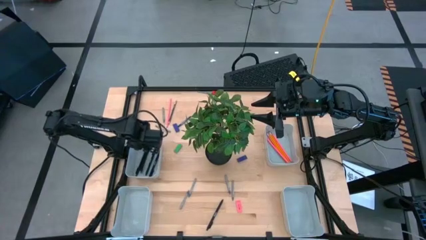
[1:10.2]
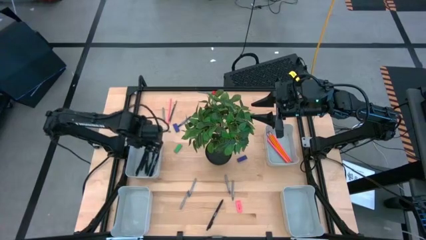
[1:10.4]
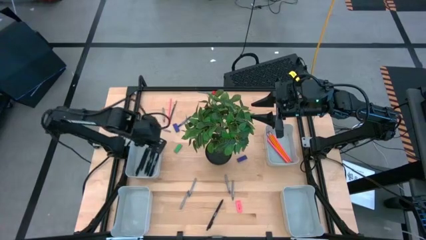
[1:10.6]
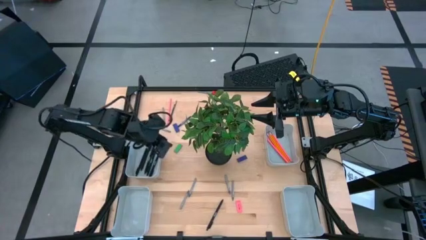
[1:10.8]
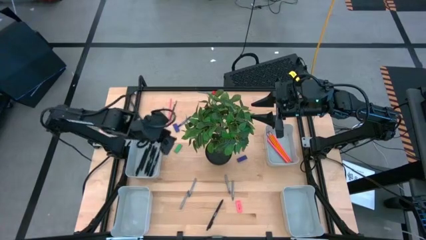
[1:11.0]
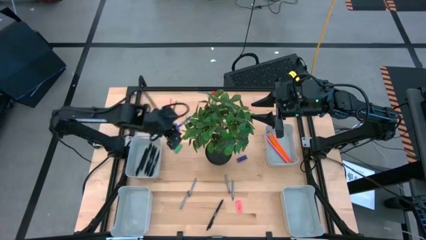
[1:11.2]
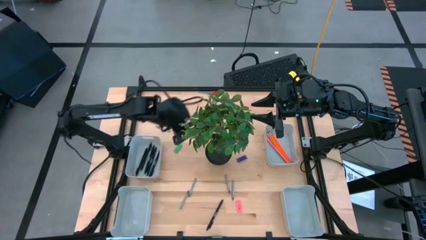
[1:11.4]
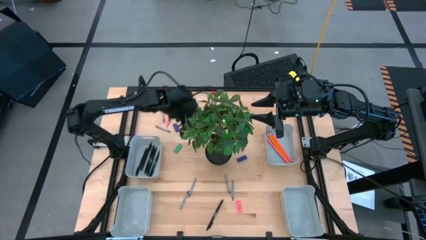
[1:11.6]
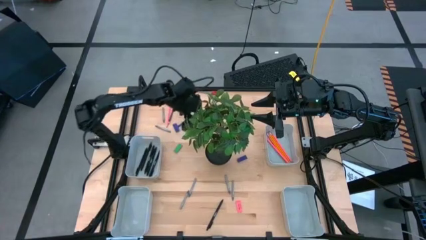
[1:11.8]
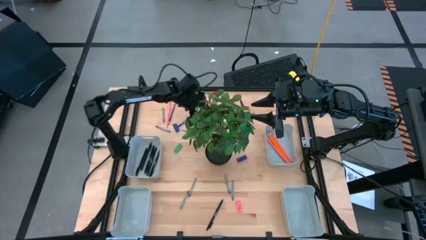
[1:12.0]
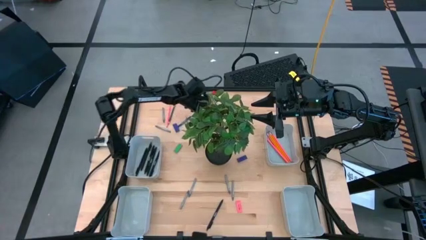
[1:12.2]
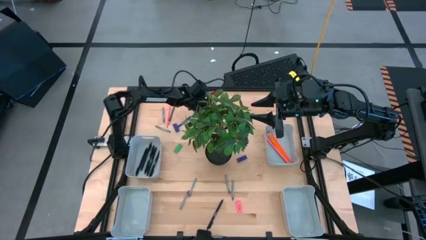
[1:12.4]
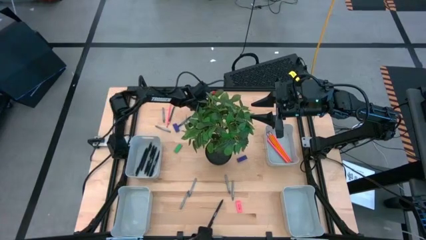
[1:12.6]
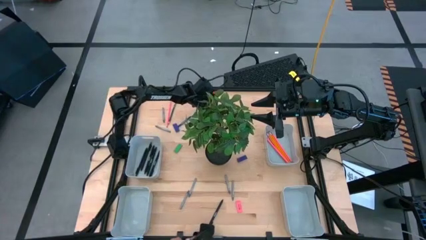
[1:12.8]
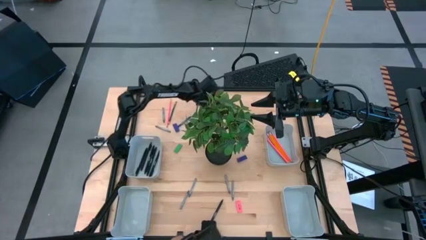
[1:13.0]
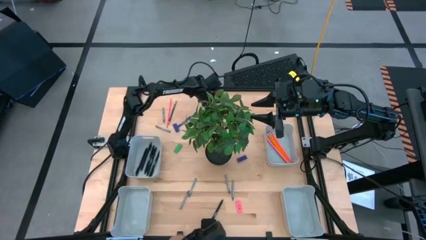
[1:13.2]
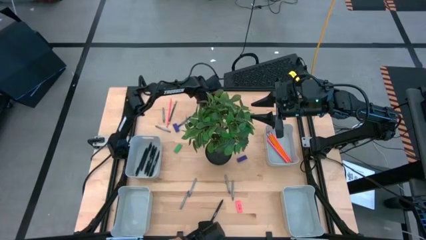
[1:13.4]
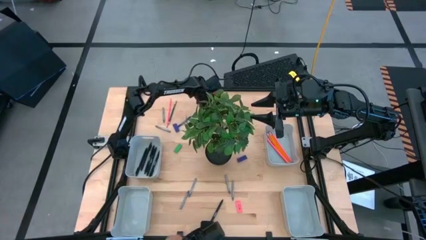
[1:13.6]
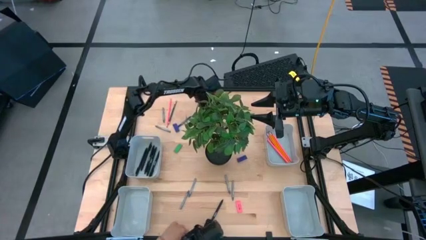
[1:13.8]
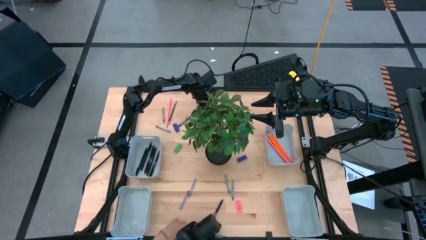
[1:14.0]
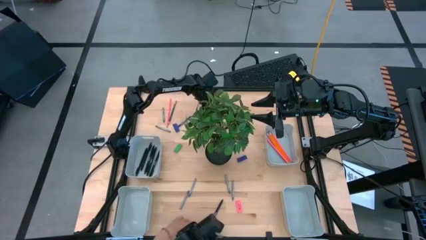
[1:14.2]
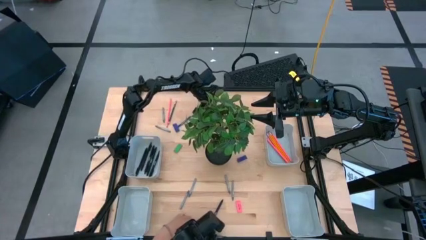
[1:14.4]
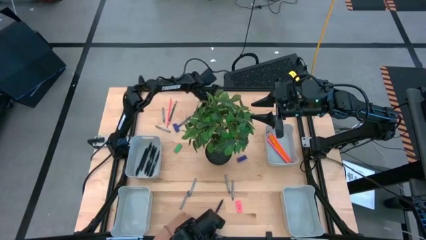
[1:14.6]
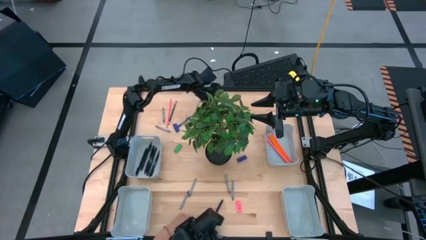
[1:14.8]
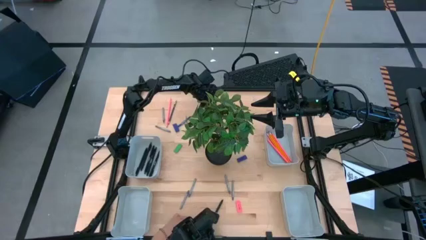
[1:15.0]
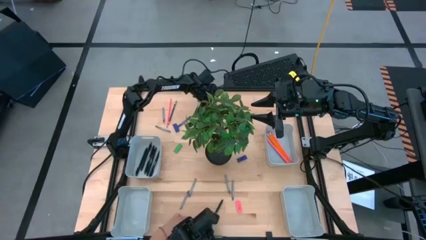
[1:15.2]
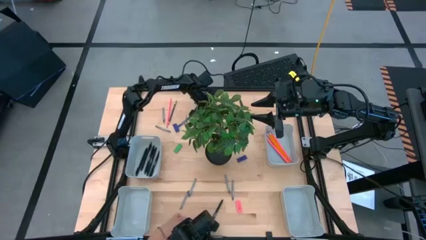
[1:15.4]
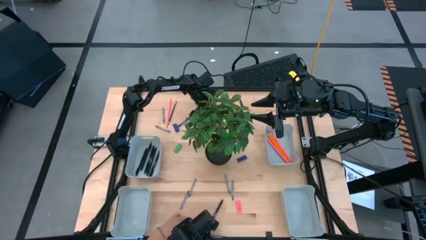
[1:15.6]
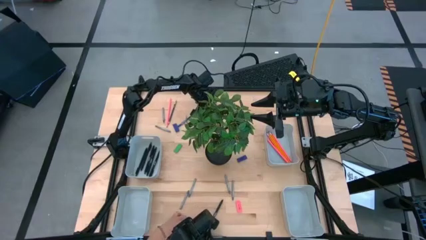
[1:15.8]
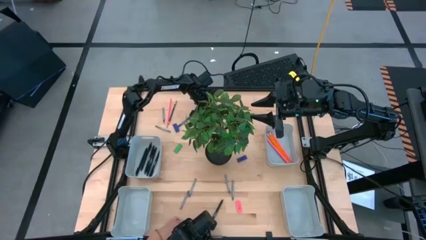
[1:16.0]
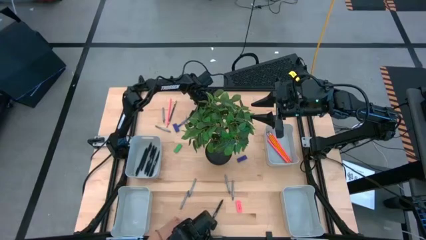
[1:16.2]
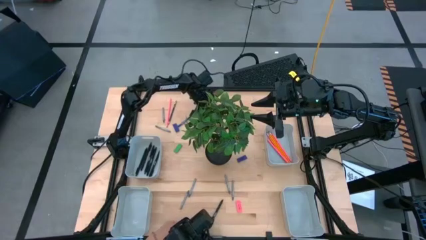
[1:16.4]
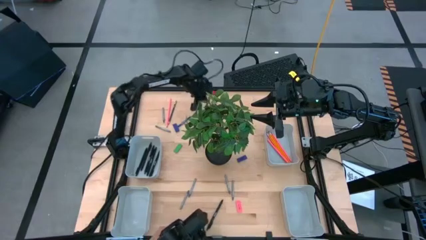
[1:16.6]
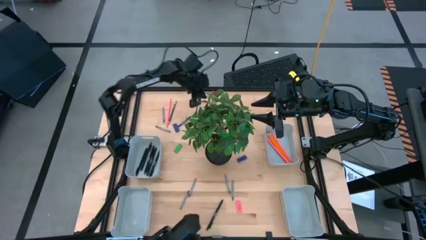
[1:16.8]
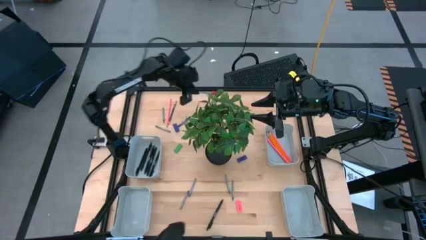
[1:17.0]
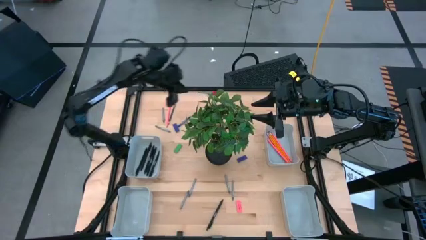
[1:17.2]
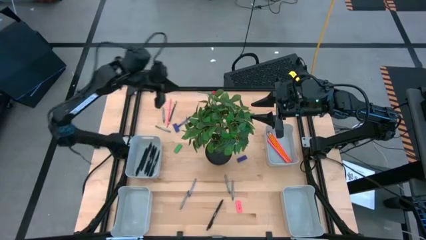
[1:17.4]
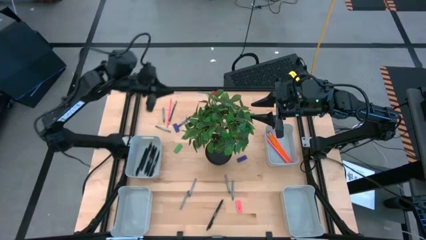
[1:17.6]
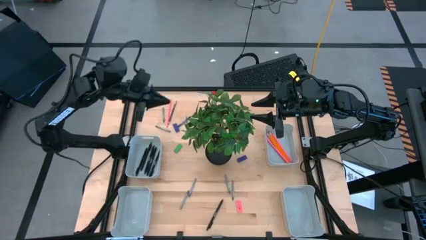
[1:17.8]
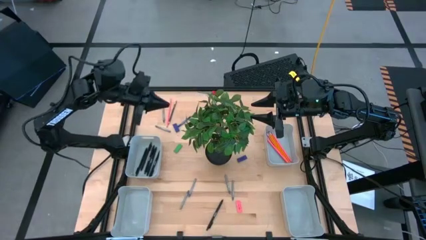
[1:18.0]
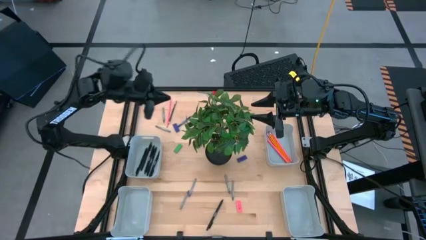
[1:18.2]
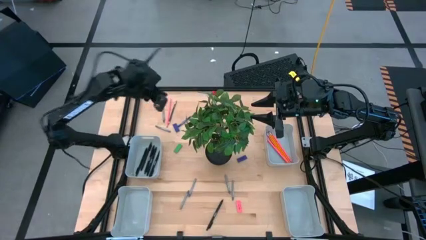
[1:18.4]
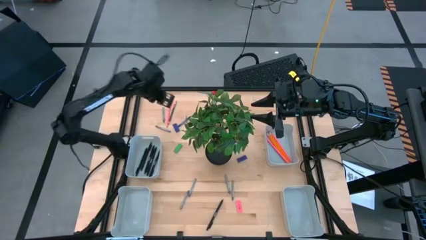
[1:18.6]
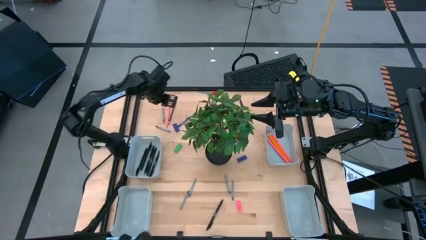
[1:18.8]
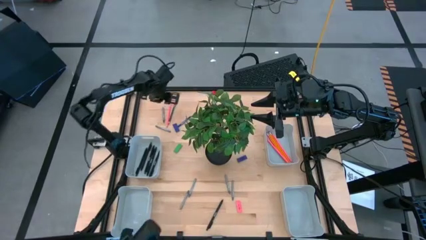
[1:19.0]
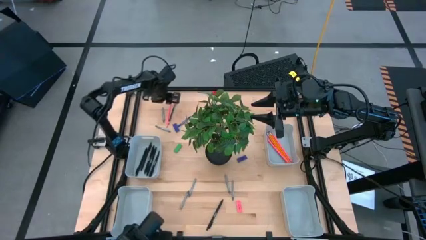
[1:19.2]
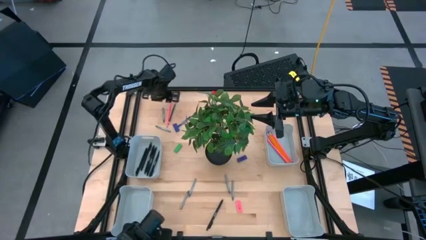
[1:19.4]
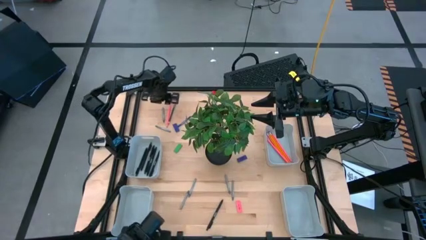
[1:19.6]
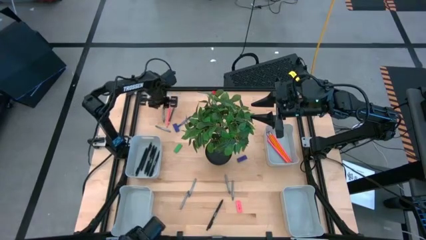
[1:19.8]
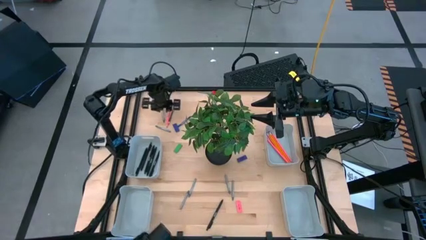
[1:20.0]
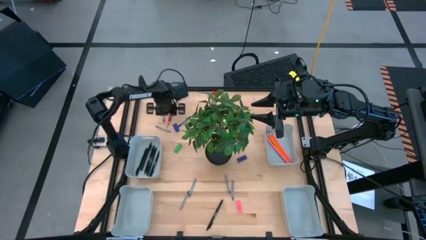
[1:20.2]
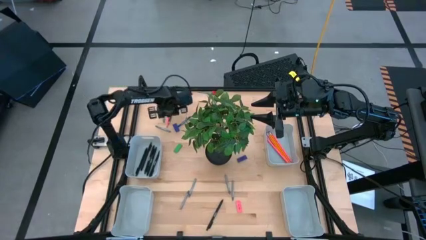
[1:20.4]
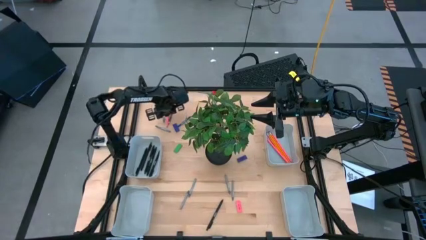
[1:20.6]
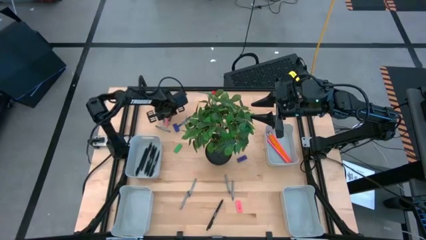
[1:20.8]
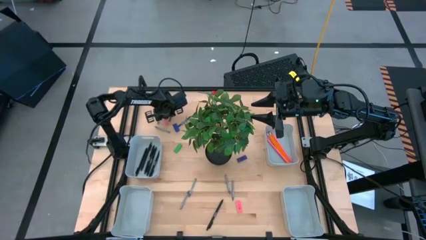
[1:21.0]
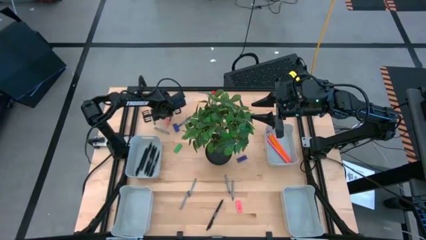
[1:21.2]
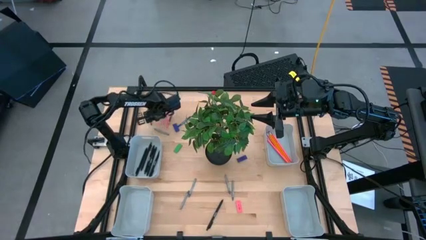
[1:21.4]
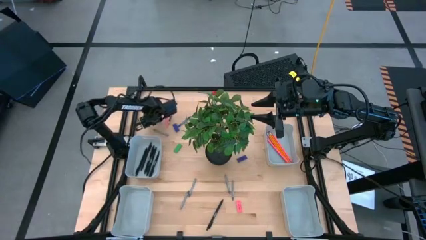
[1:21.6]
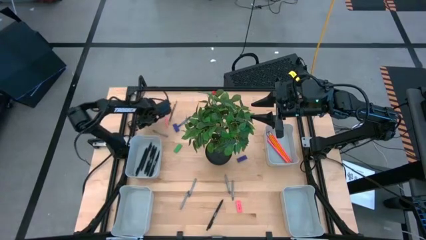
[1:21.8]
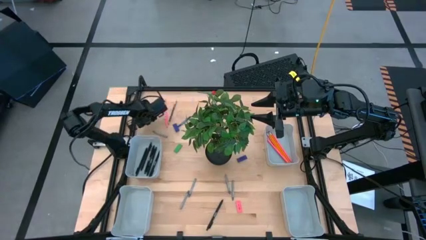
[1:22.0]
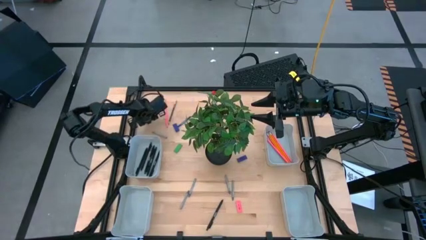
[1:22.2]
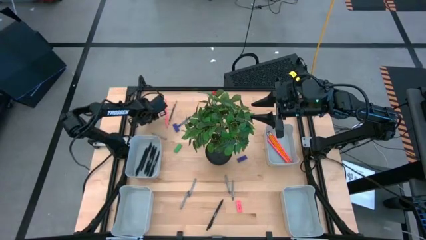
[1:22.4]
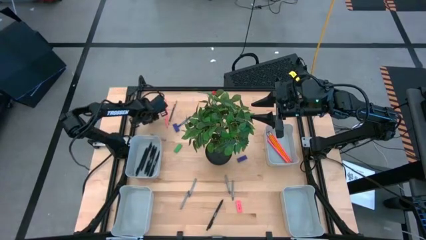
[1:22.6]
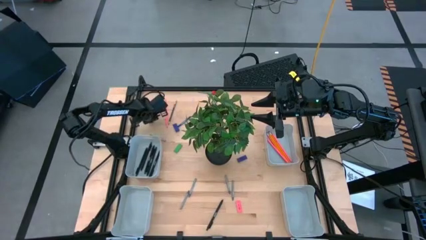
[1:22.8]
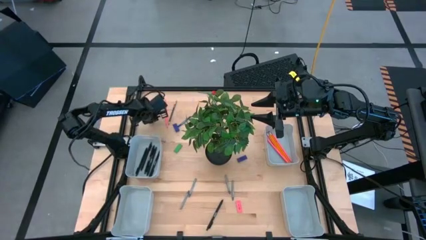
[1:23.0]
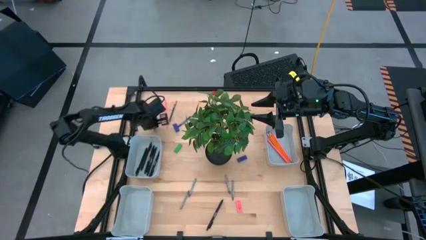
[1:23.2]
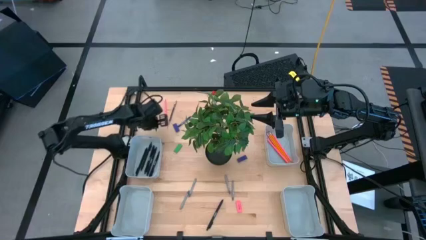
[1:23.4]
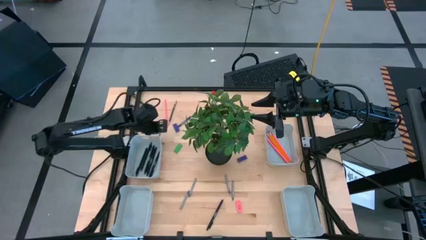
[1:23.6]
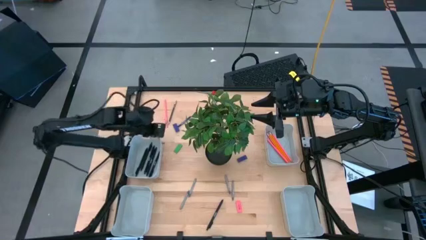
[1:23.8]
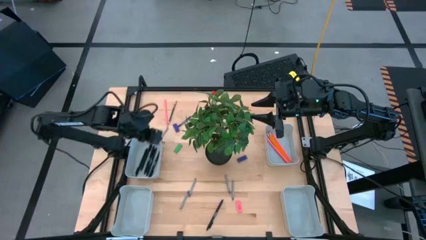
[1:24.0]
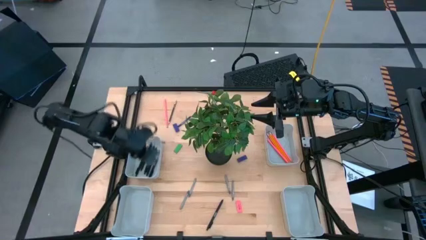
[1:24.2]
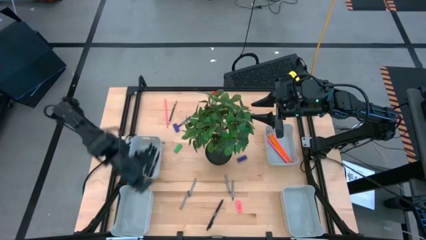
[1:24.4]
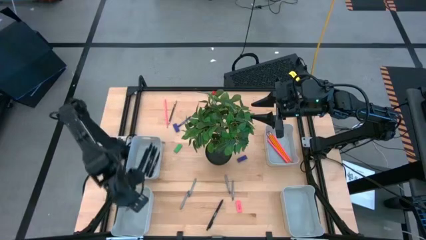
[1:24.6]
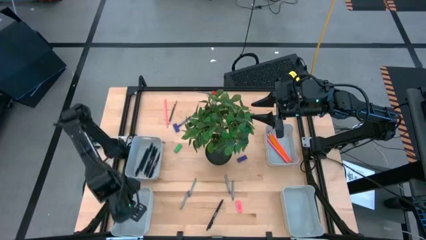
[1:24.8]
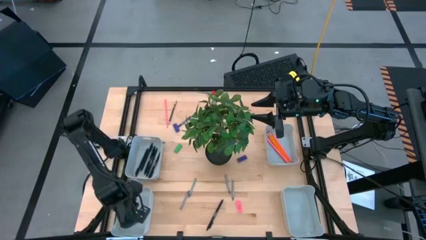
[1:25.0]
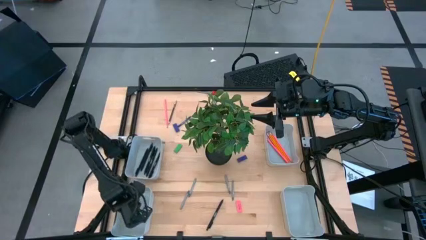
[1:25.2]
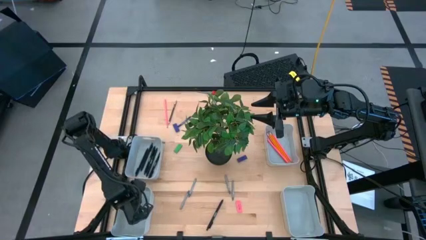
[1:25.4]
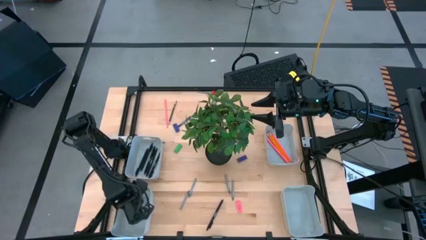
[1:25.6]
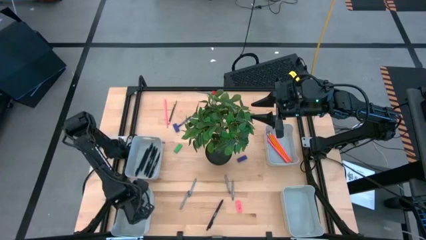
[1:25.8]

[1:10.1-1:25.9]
Task: Sort crayons/erasers/pens/pencils in bins
Put the gray crayon into the bottom left gray bin
